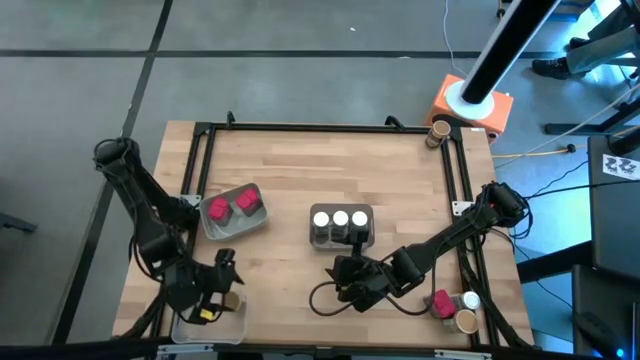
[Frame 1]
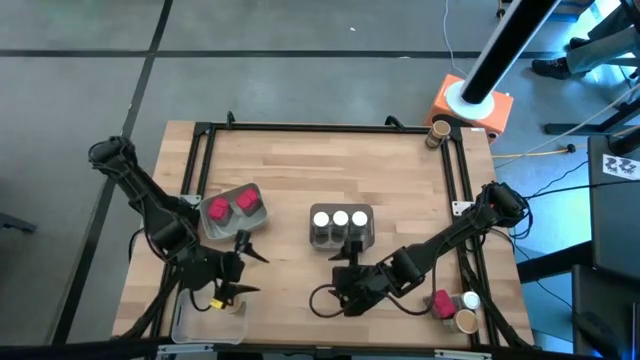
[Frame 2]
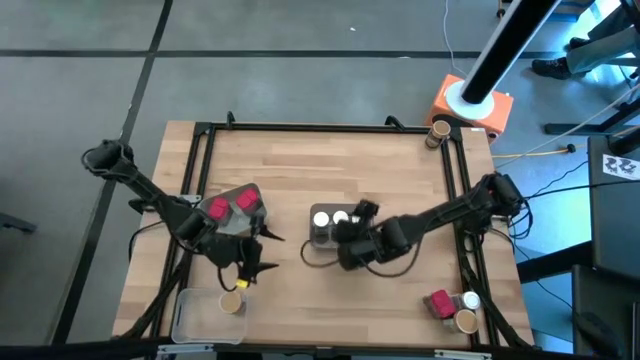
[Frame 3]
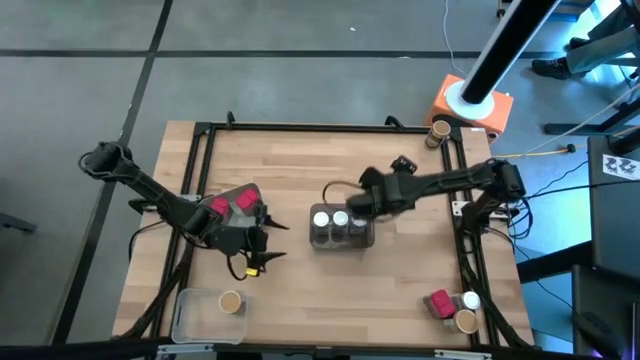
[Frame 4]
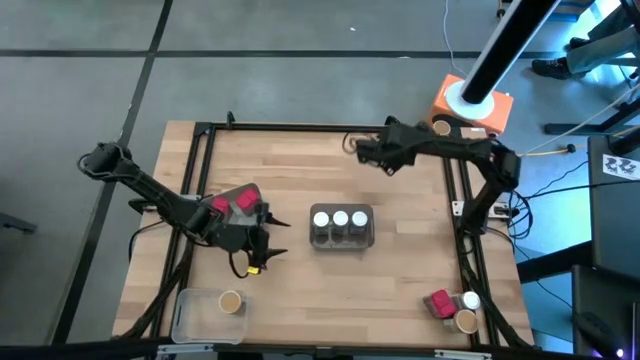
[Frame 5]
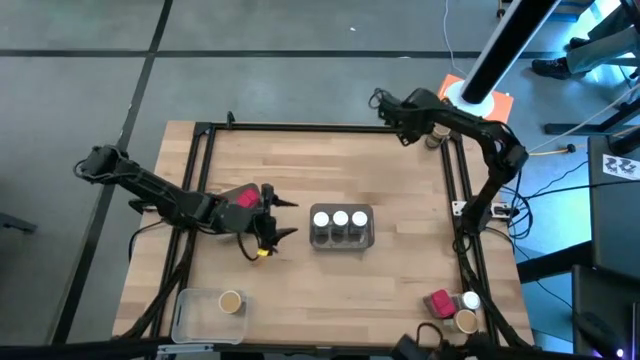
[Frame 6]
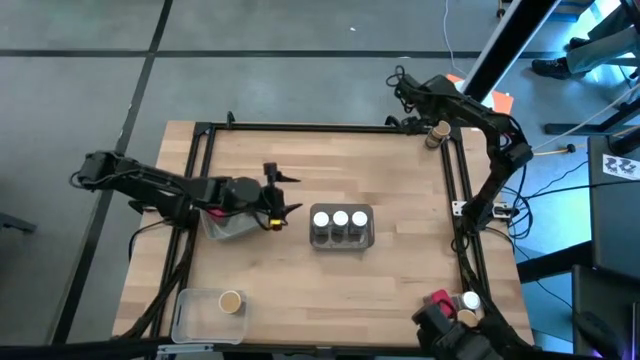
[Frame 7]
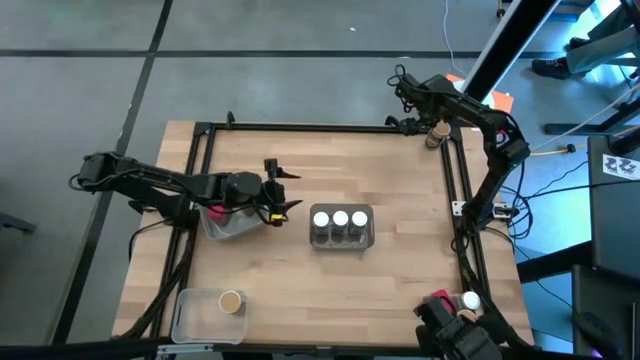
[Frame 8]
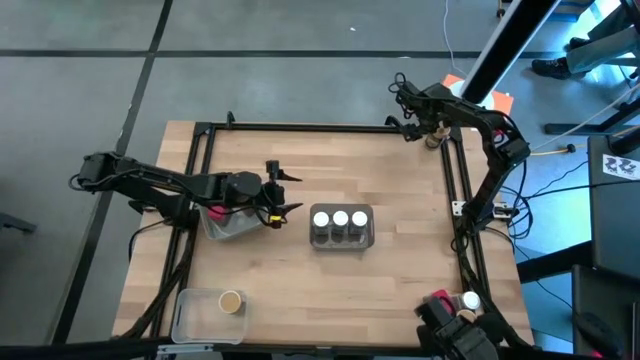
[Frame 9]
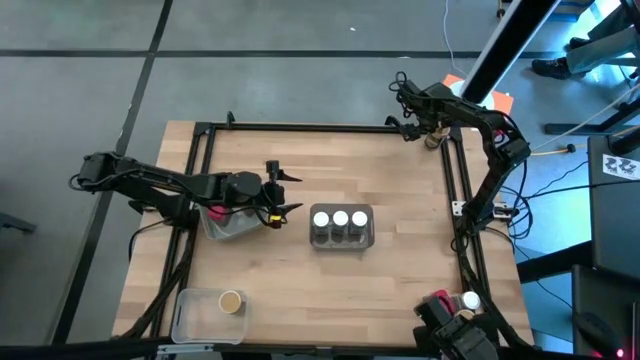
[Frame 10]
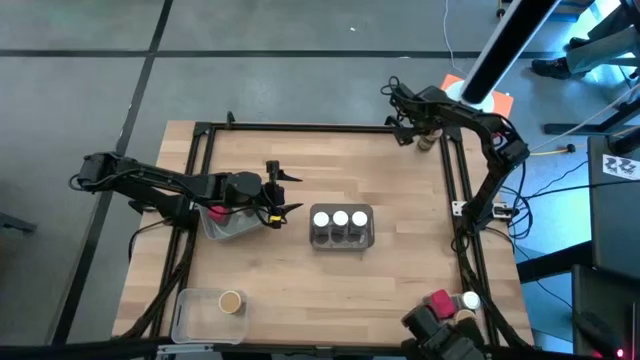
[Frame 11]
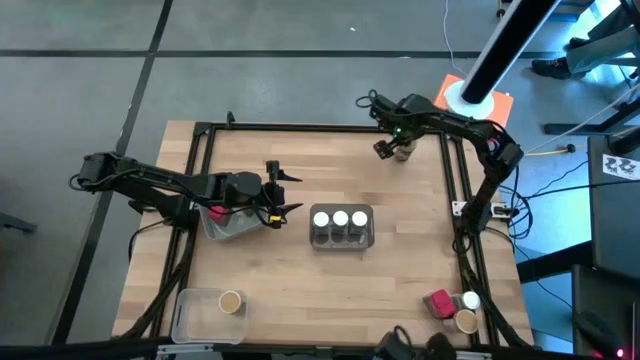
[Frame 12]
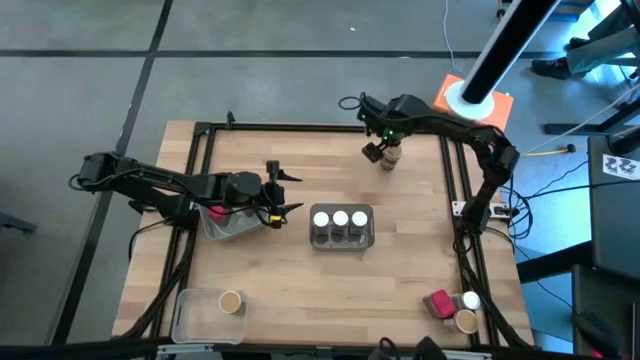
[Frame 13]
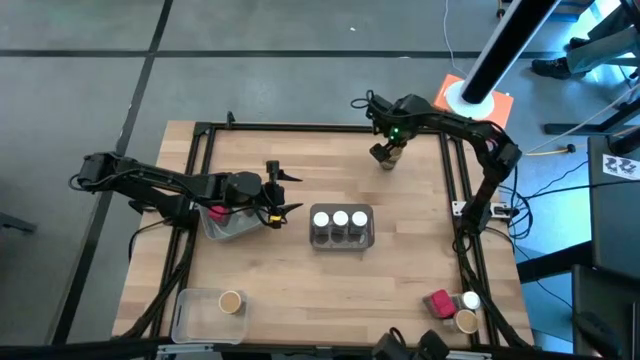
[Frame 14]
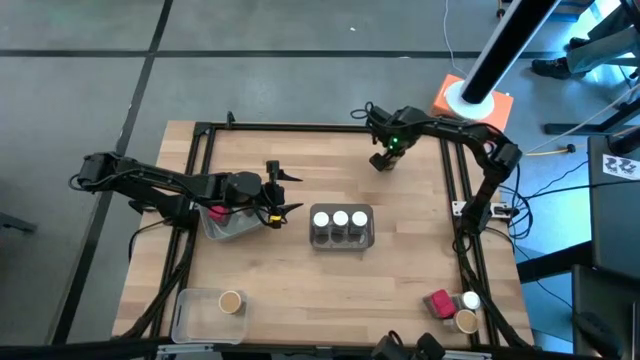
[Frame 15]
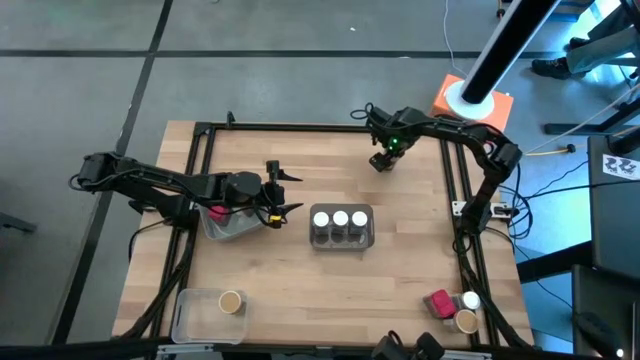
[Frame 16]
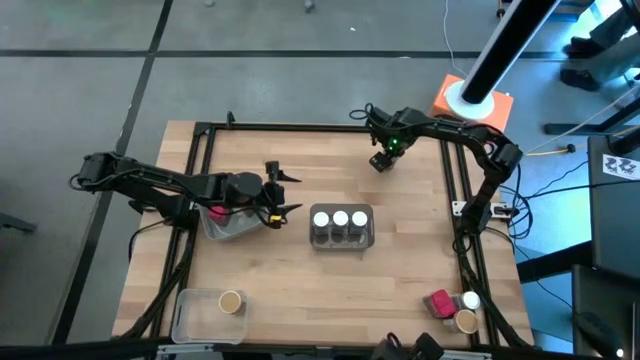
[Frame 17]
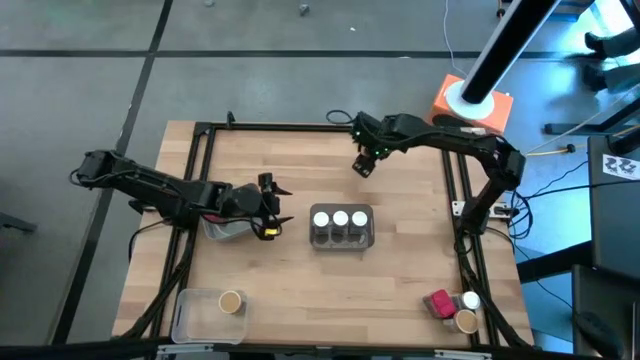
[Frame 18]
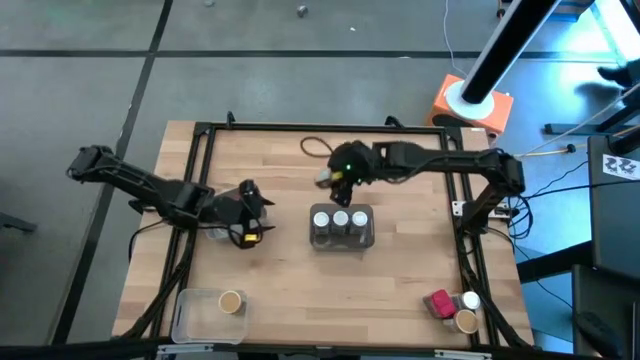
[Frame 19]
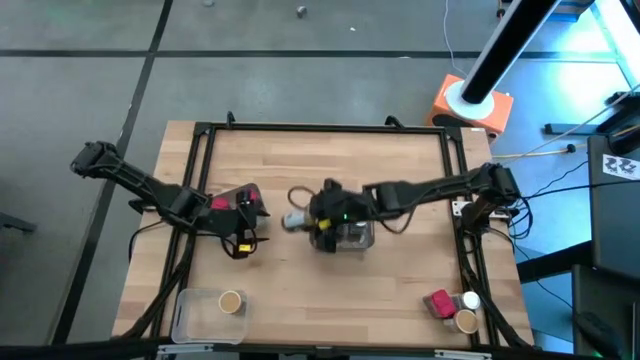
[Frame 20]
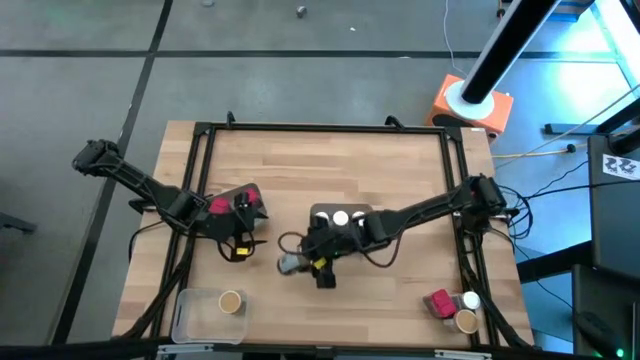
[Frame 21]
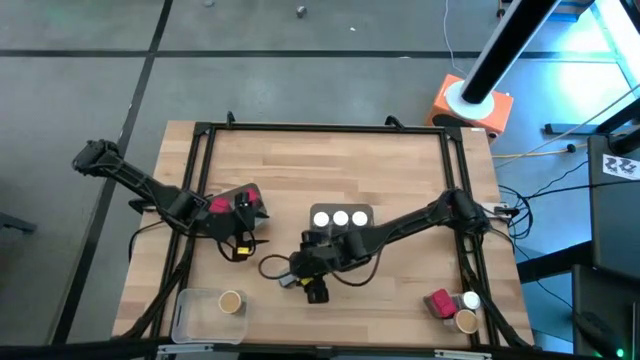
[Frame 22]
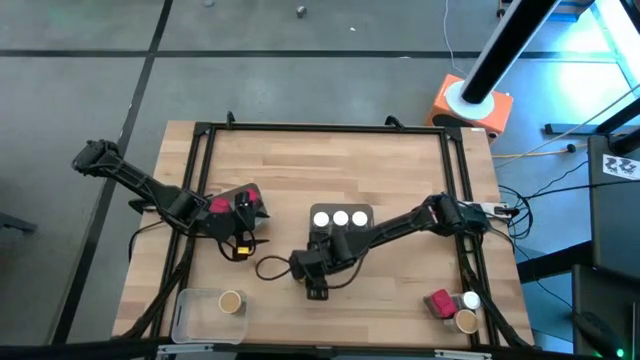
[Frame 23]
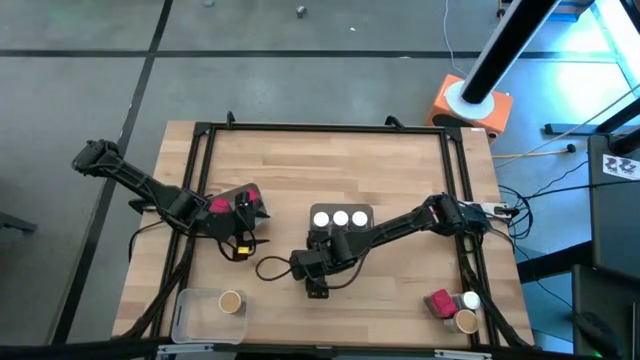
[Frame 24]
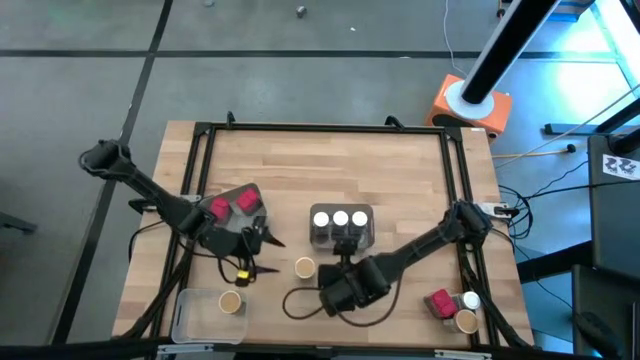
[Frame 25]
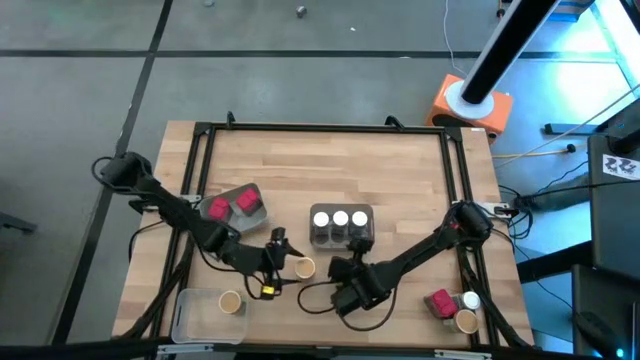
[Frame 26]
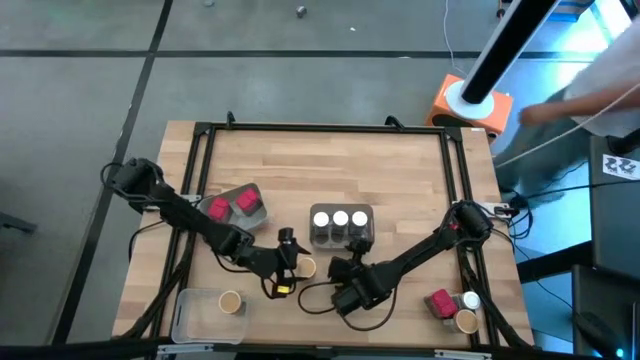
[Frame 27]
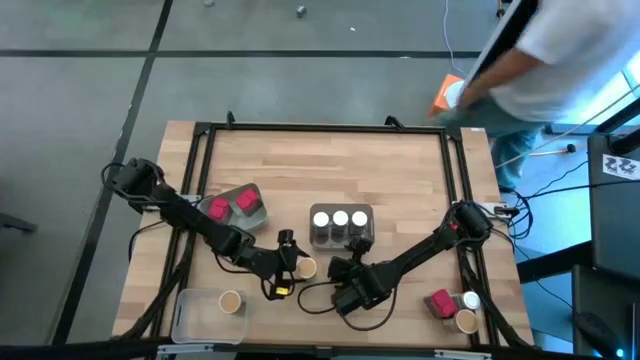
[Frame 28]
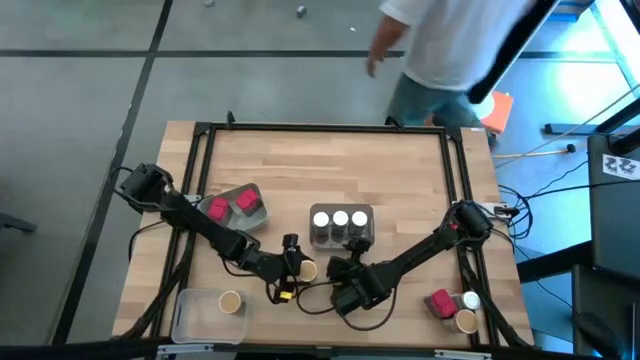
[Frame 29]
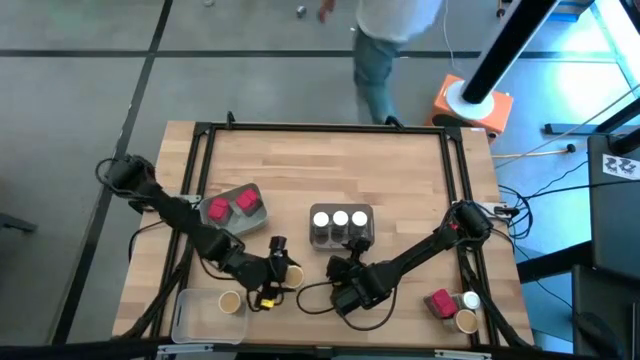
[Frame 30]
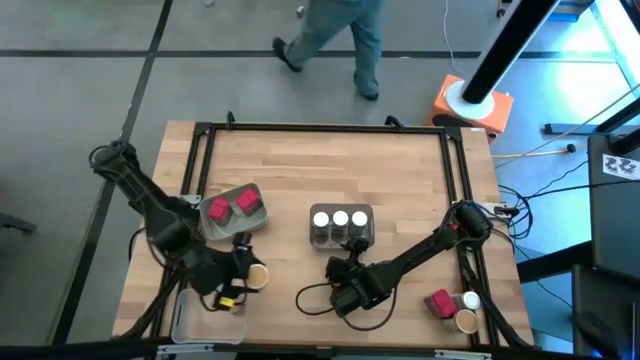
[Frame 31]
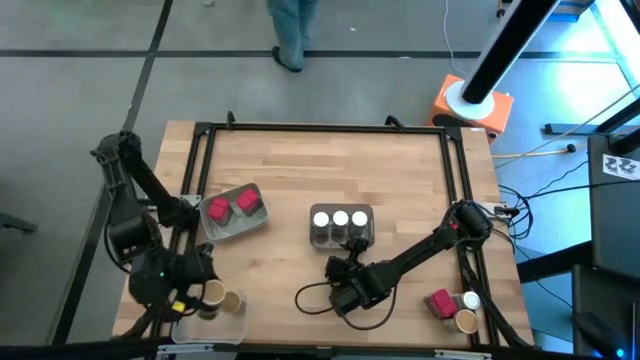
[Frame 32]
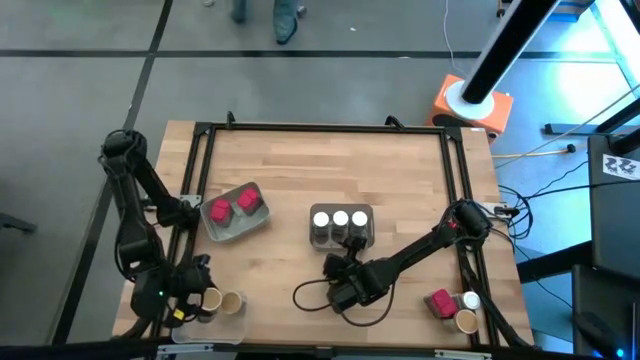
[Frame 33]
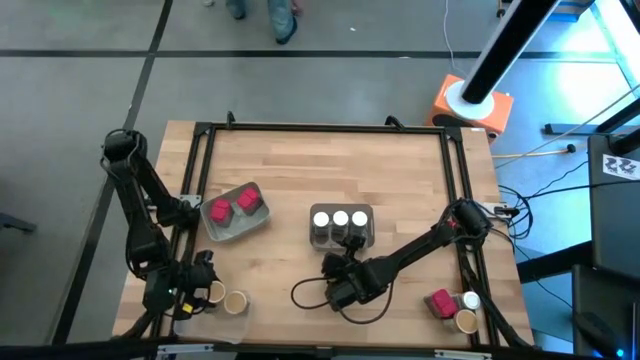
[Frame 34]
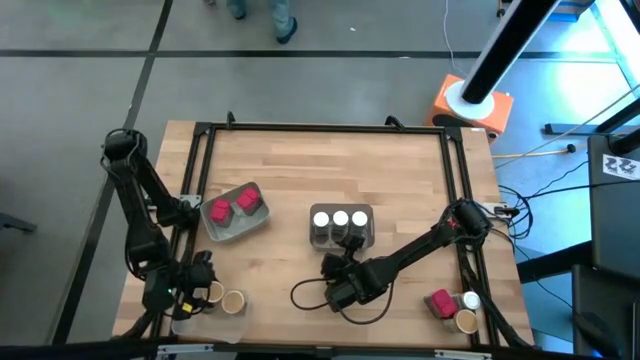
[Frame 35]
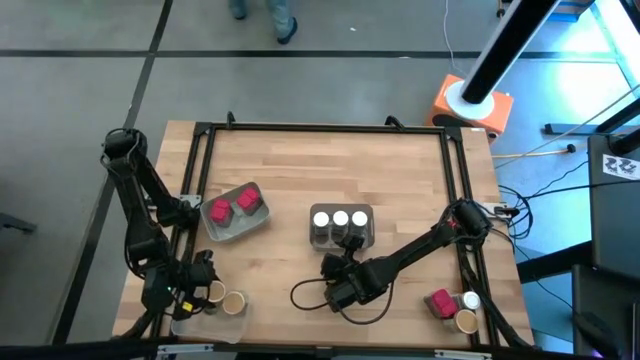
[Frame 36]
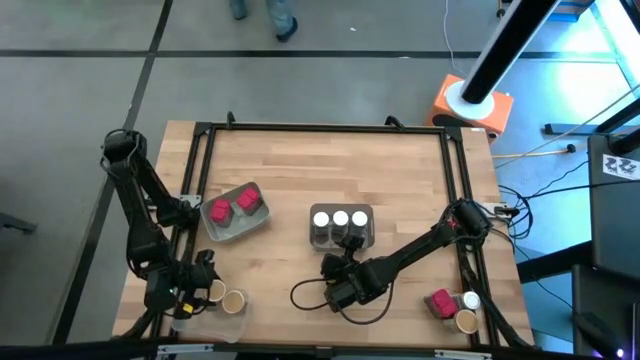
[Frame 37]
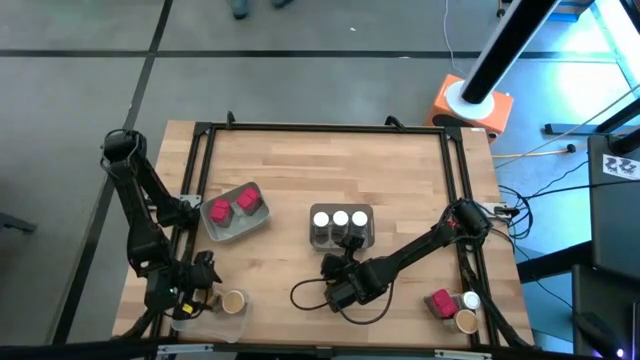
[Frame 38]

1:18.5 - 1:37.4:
Task: Sort spices by type
Put the top gold seasoning bottle into the transparent bin

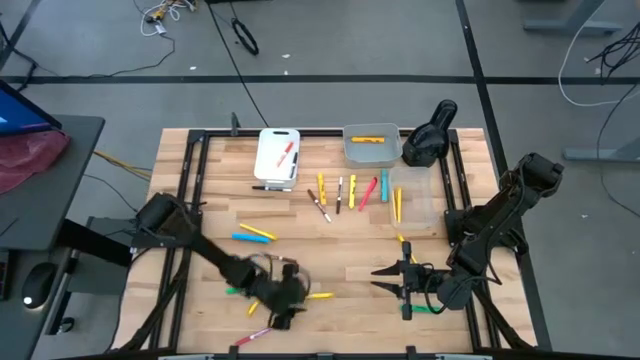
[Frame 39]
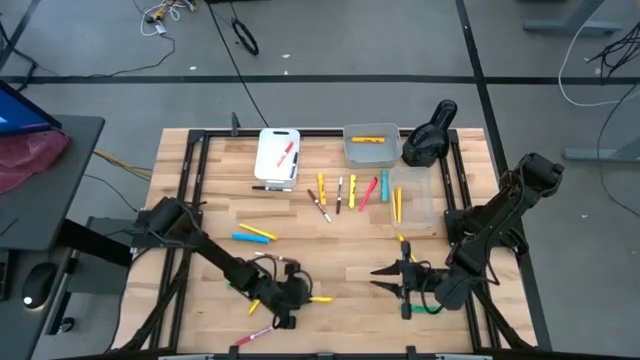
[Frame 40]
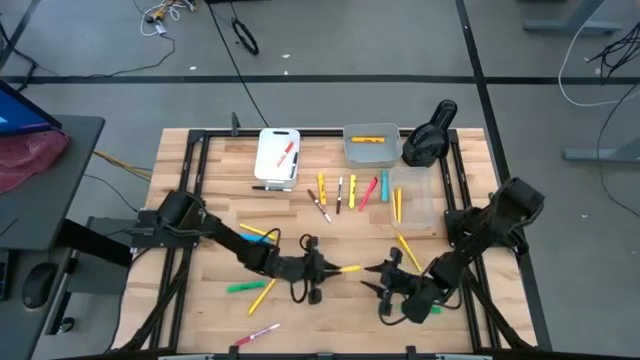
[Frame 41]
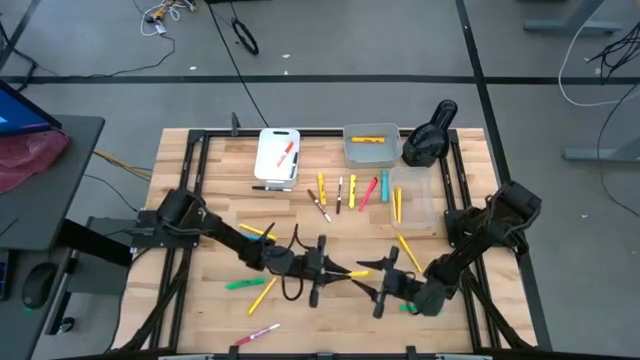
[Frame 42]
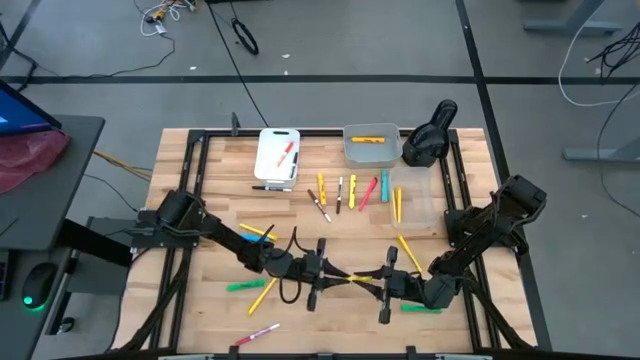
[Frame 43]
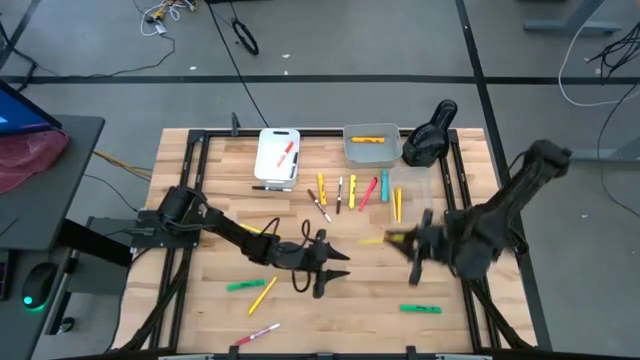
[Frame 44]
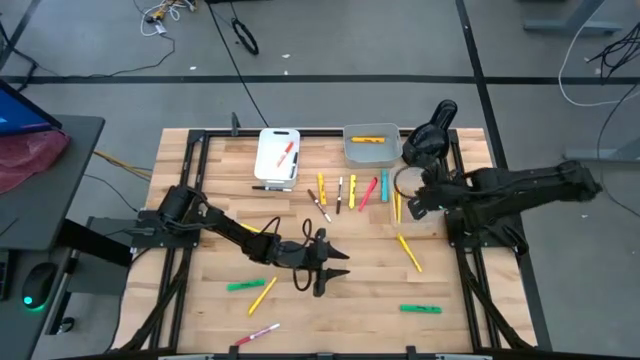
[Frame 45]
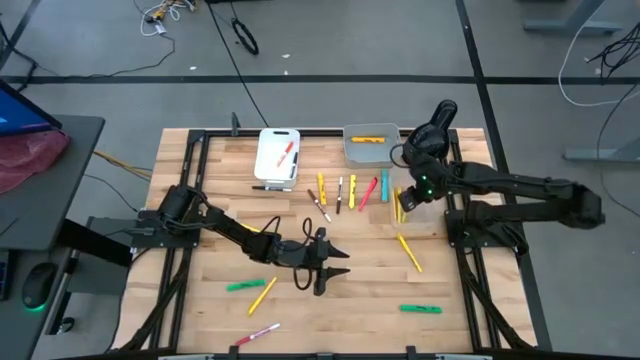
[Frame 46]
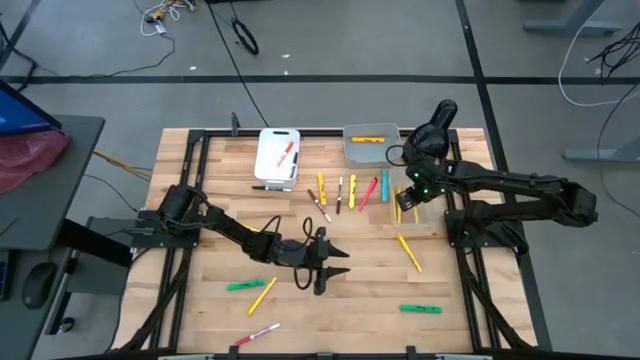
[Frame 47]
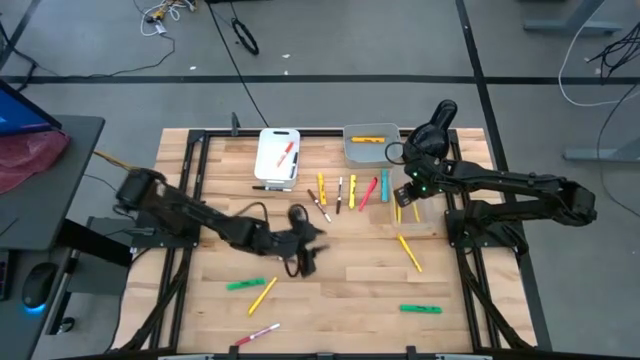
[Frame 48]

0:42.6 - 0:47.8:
Task: Pick & Place Markers
Put the yellow pen into the transparent bin
